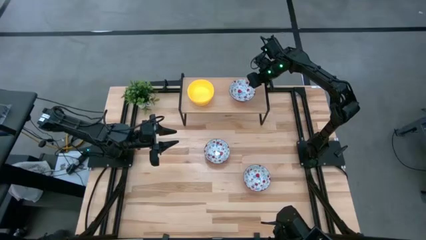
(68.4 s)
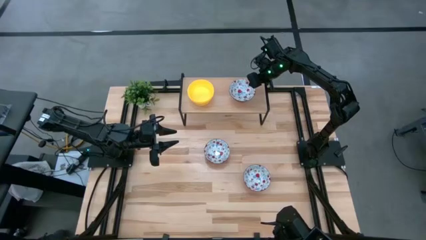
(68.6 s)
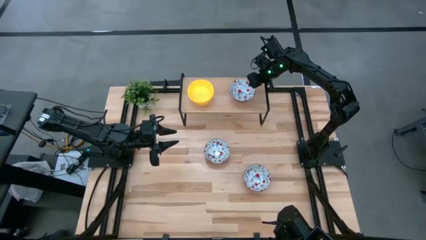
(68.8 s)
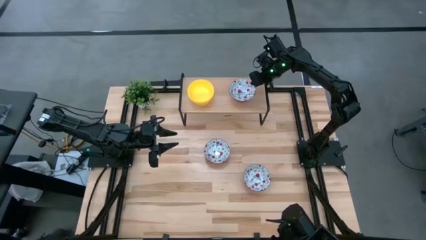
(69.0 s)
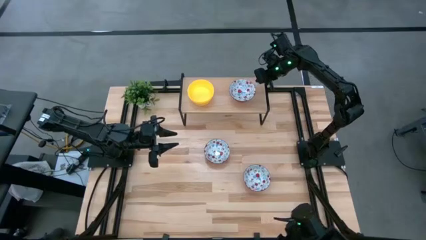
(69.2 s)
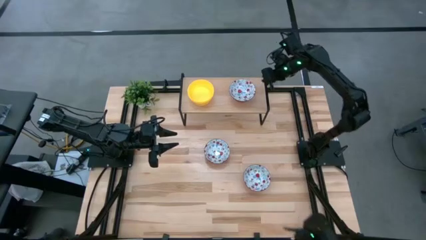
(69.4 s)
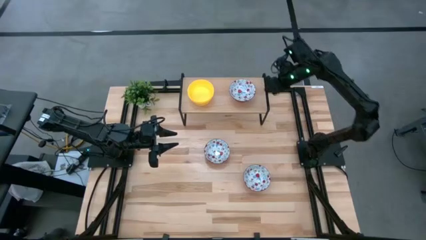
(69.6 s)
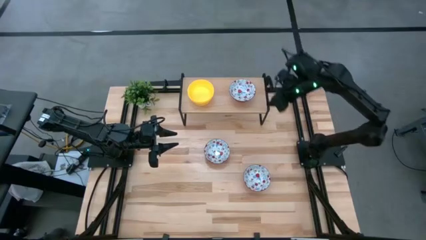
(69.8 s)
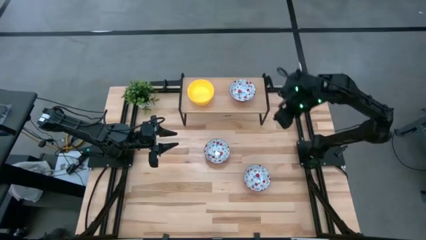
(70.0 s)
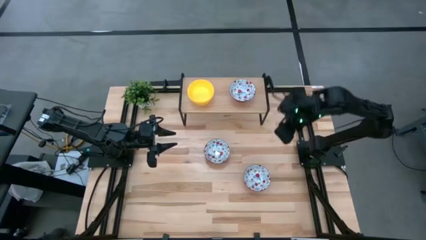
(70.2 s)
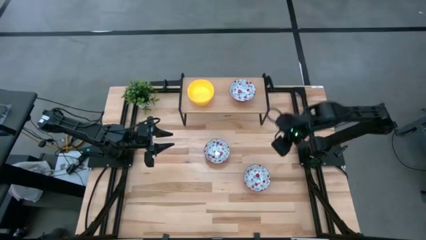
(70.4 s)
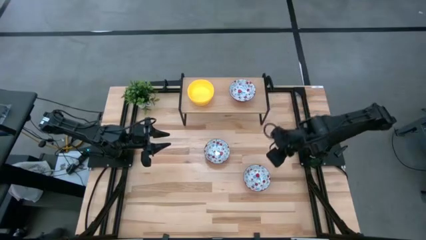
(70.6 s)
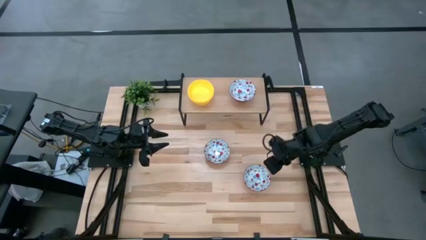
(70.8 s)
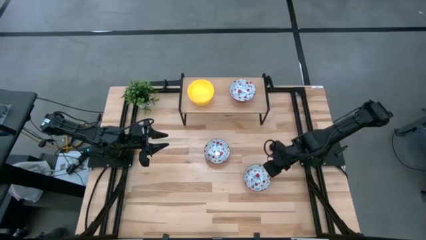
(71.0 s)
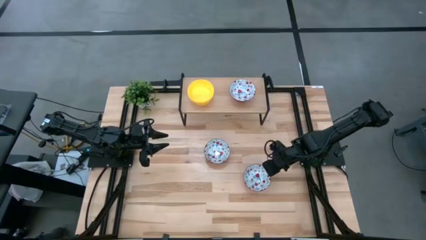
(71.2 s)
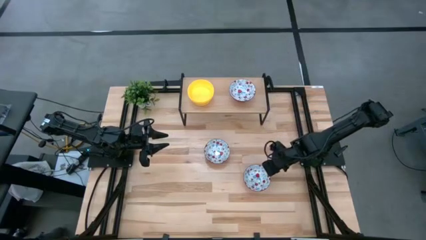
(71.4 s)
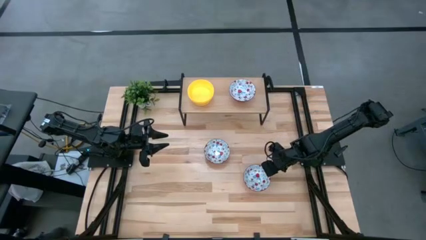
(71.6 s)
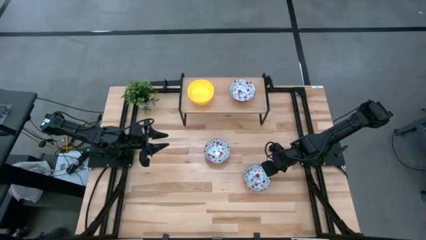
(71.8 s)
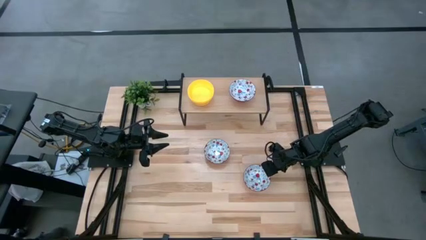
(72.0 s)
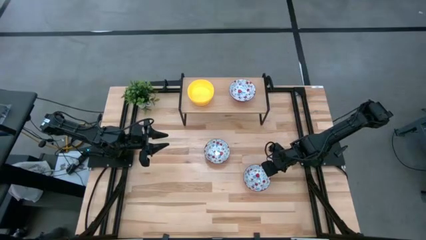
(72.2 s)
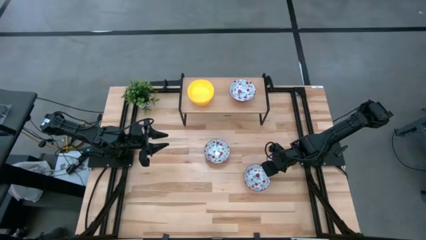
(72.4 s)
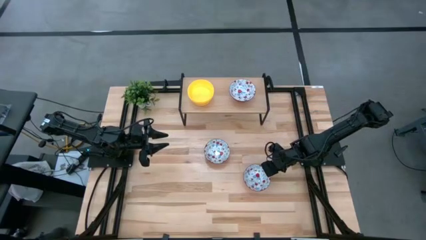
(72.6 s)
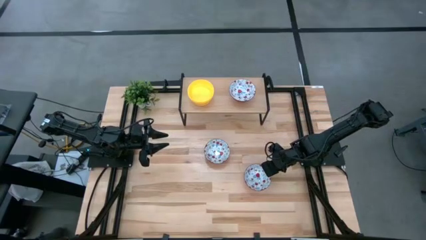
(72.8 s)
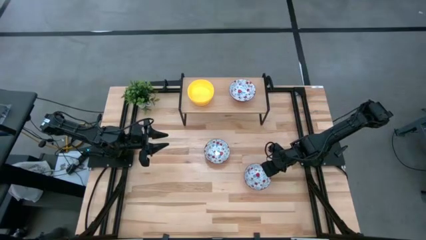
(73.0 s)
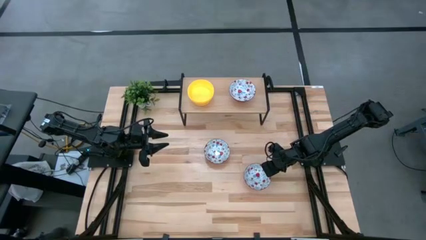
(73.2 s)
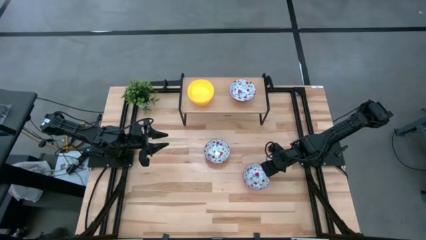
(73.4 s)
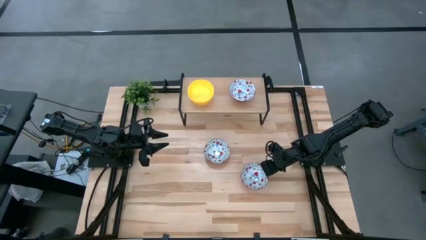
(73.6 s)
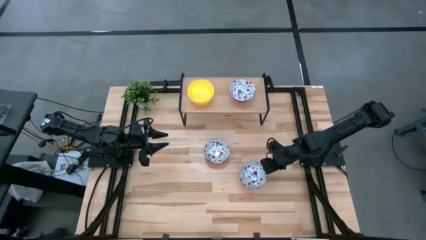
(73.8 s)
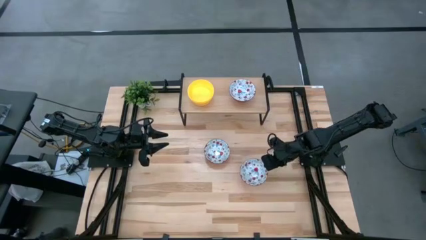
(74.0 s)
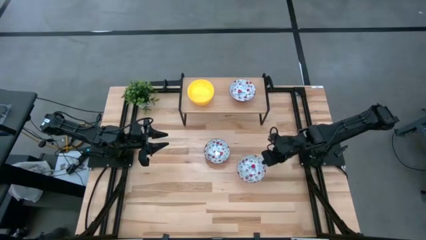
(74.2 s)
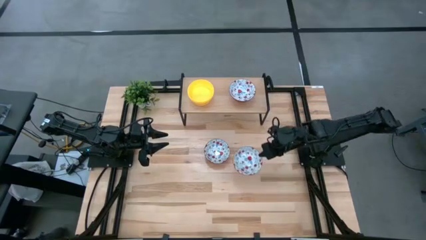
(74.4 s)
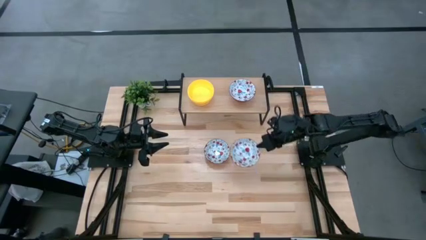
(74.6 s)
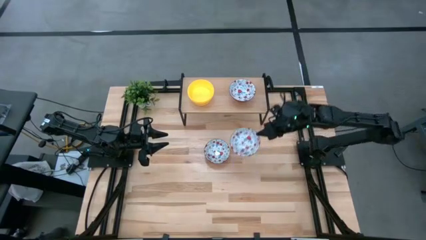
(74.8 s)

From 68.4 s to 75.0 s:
Task: Pick & Place Mini bowls
Stack the bottom white bowl on top of the white bowl on the shelf

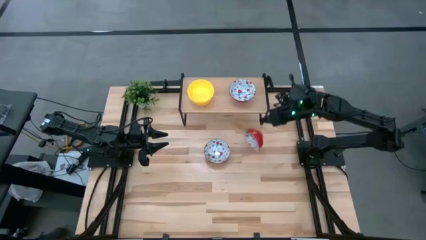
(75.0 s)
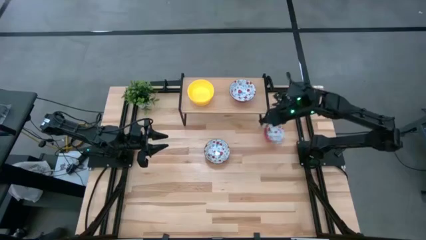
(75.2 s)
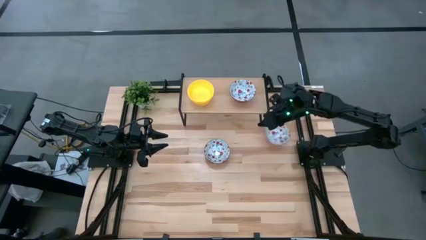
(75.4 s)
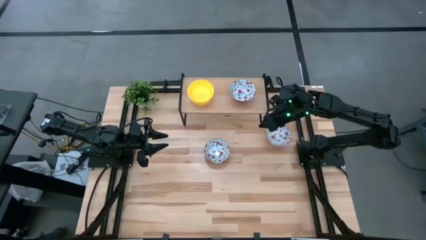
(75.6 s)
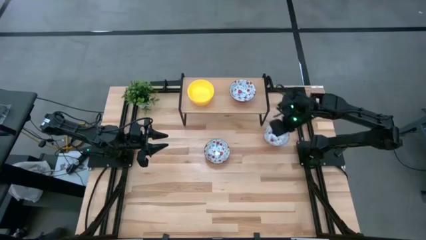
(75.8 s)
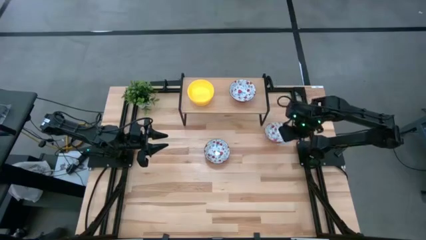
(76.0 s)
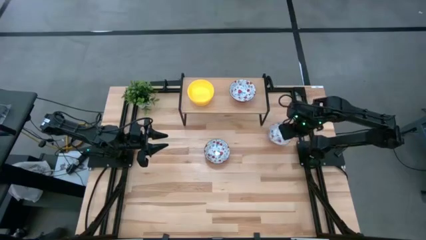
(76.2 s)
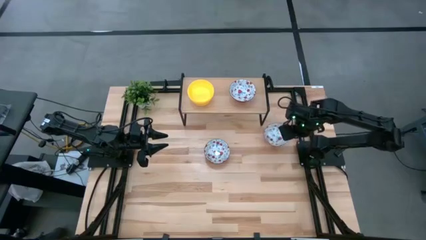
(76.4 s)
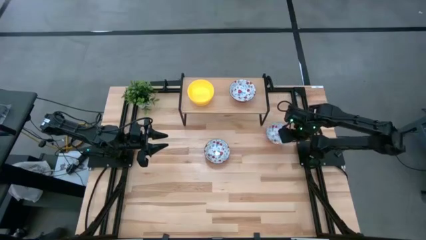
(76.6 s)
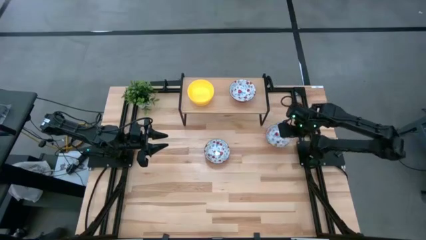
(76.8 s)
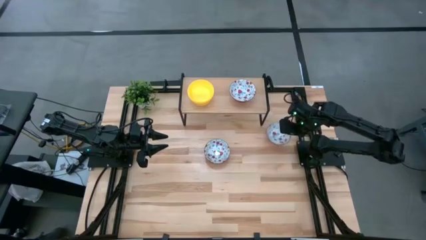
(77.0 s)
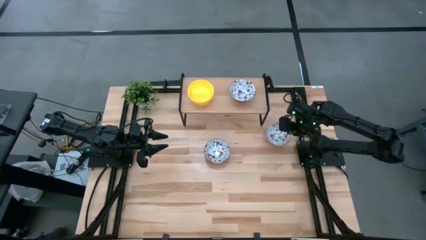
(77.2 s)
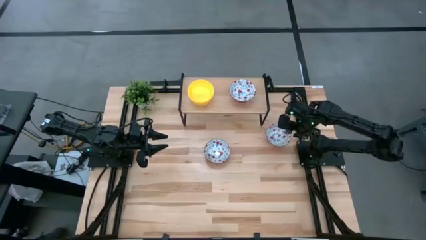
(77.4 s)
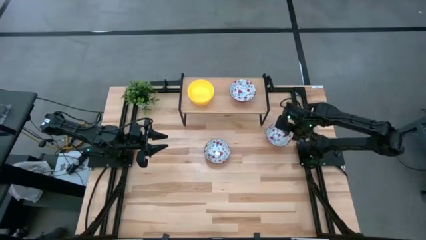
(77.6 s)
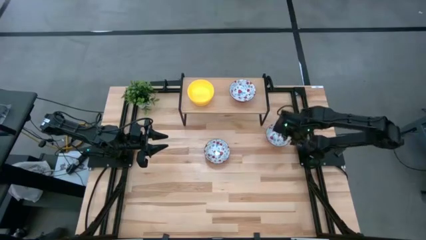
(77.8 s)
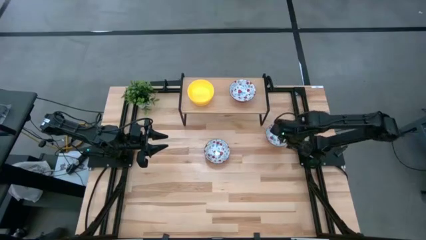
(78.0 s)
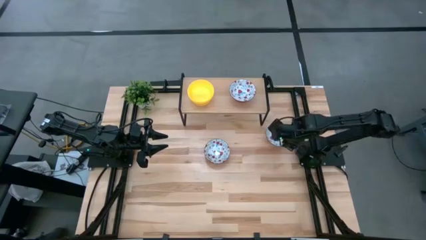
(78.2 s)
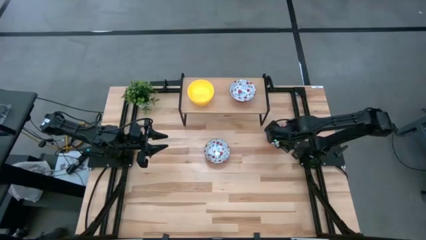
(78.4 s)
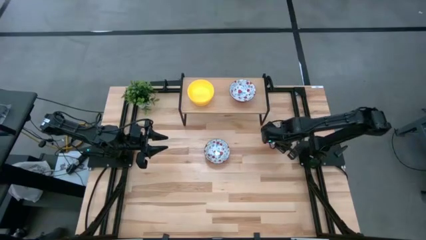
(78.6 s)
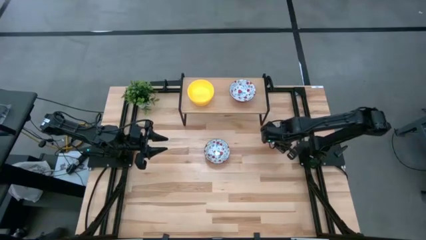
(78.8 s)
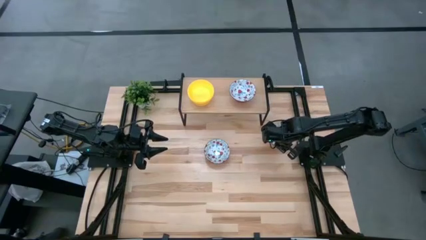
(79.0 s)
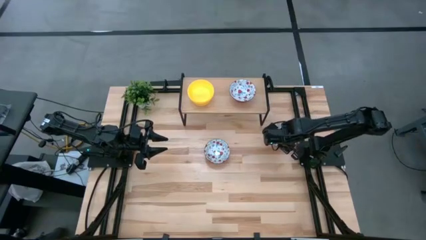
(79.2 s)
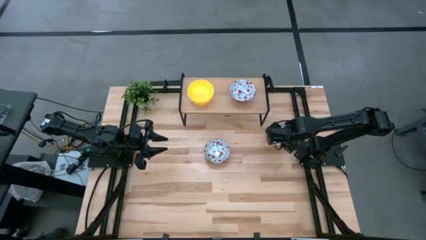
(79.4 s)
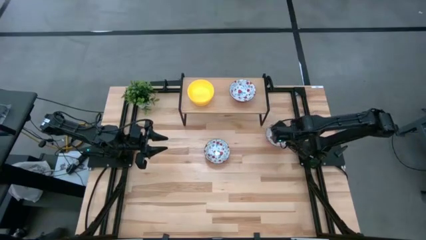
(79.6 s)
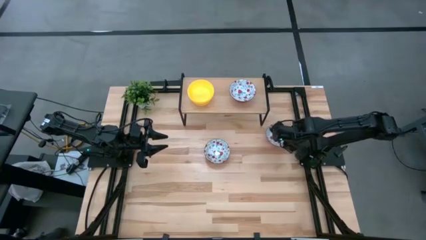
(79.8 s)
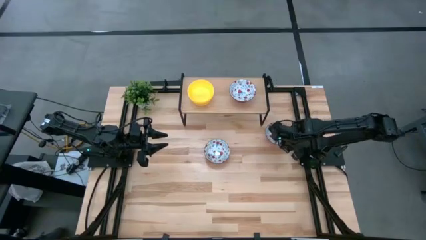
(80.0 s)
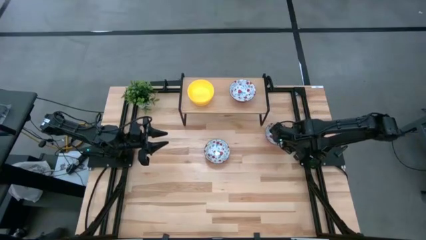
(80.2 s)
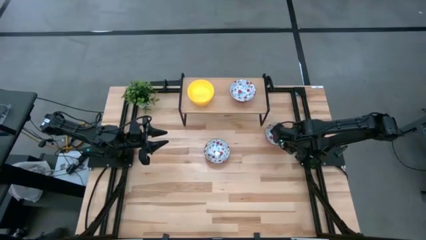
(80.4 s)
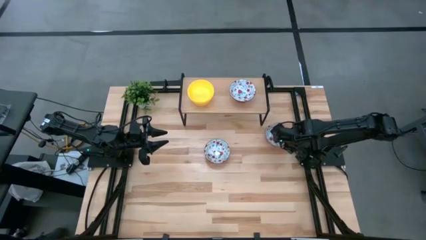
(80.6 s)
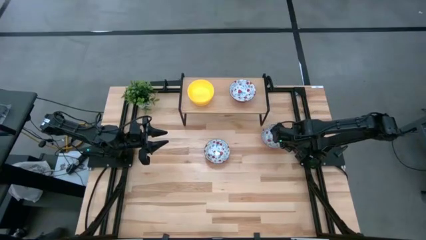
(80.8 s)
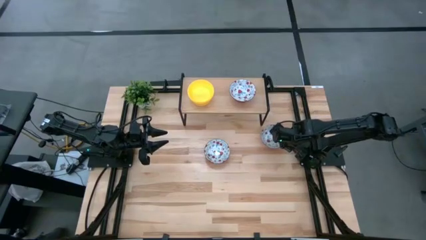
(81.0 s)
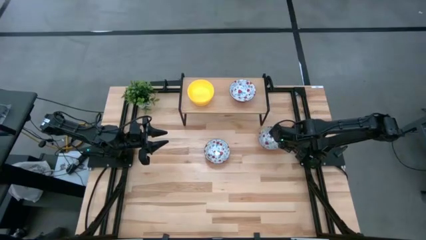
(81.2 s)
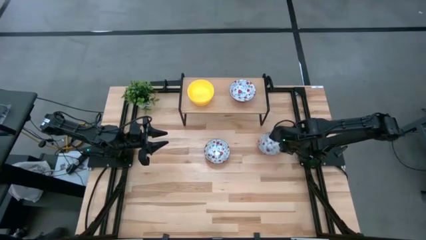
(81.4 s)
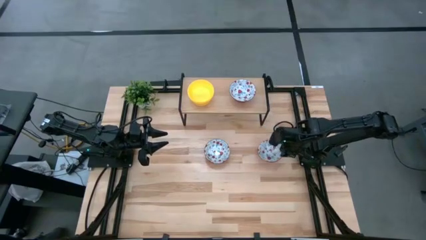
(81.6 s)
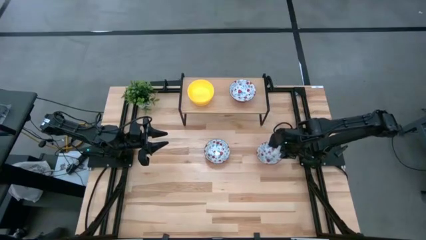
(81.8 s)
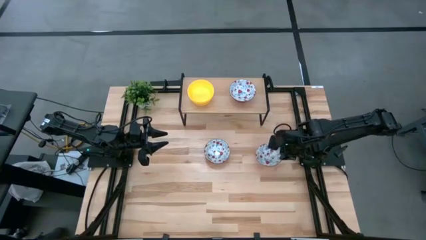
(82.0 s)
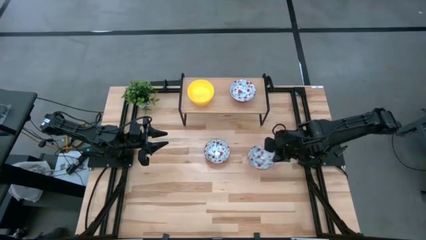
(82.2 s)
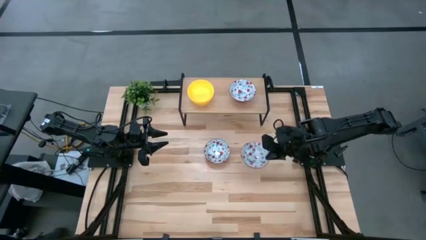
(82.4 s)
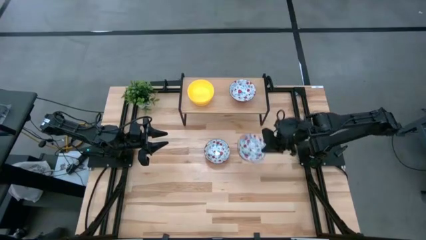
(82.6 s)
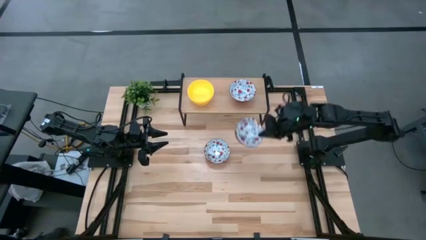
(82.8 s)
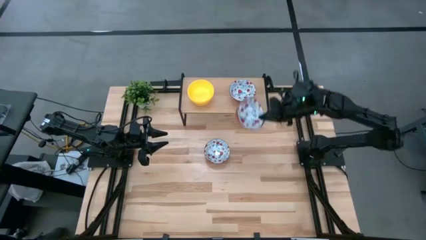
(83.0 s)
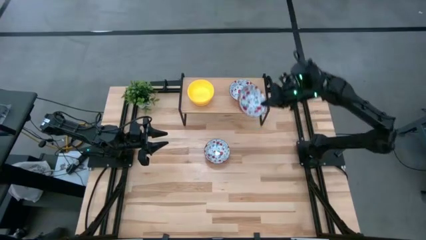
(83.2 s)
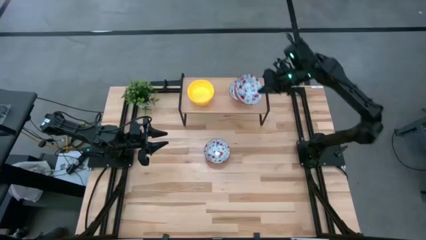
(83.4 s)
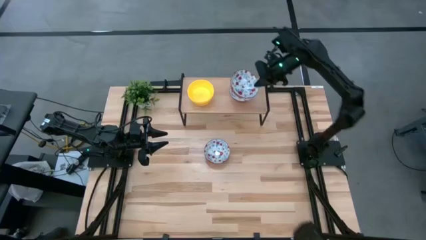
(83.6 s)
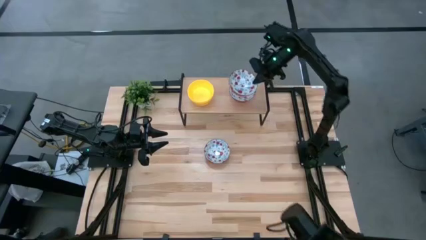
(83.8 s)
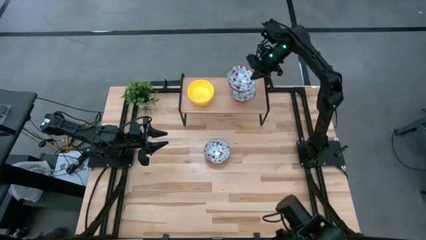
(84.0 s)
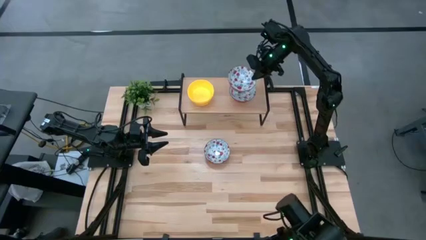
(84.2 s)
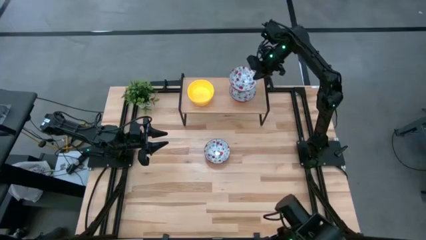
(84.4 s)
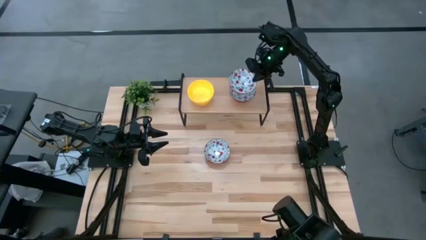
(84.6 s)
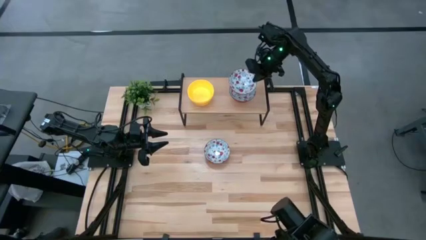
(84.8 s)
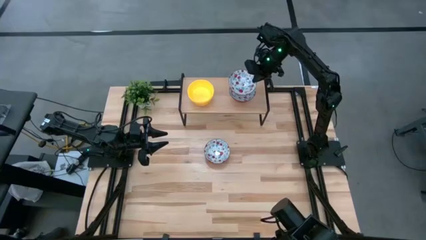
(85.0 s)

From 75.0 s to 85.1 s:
Stack the right white bowl on top of the white bowl on the shelf
